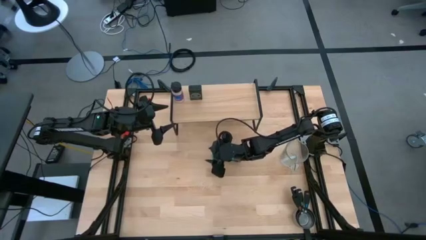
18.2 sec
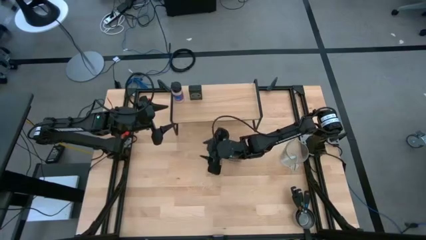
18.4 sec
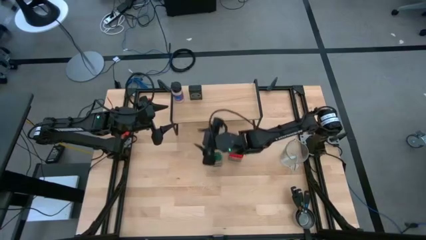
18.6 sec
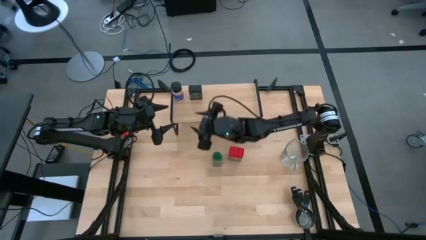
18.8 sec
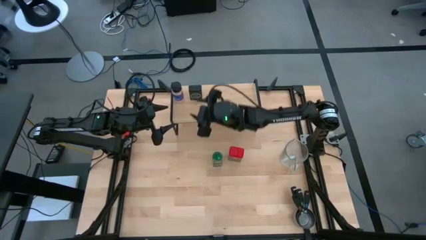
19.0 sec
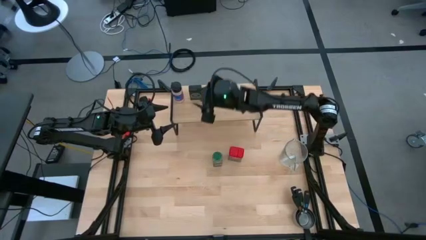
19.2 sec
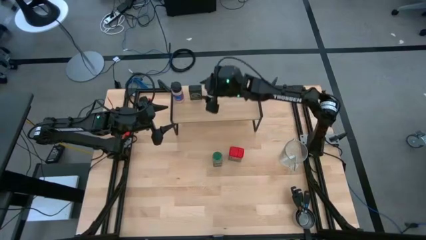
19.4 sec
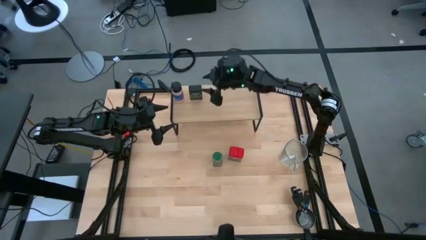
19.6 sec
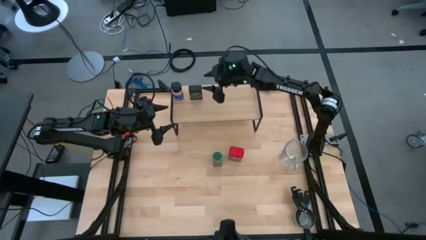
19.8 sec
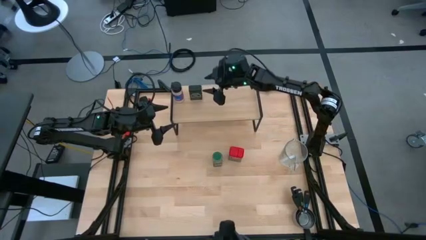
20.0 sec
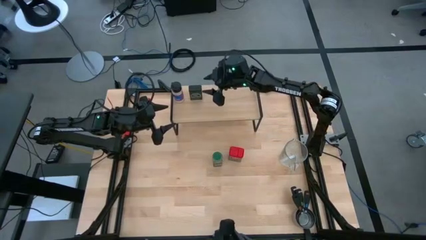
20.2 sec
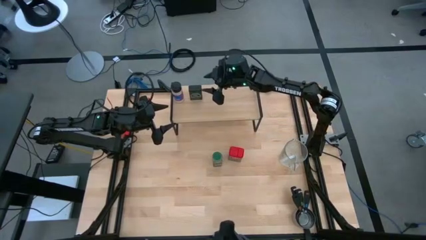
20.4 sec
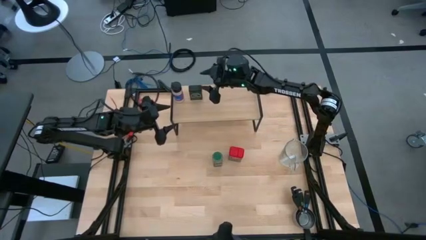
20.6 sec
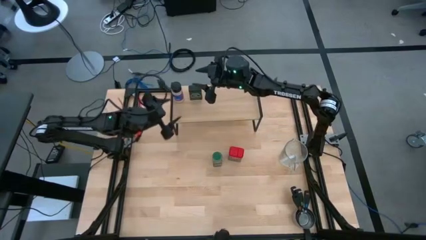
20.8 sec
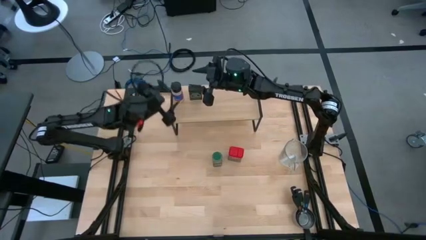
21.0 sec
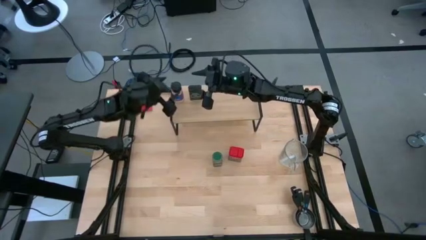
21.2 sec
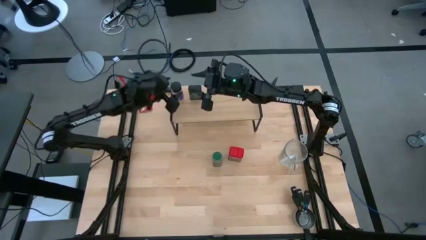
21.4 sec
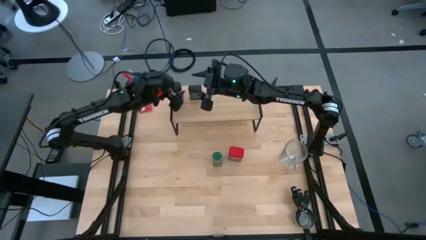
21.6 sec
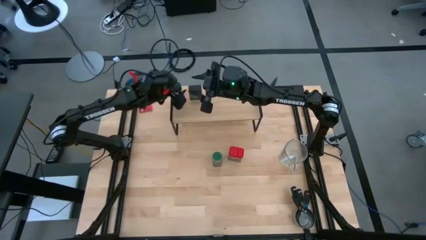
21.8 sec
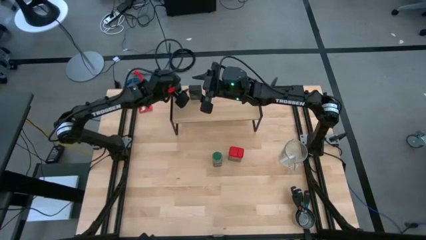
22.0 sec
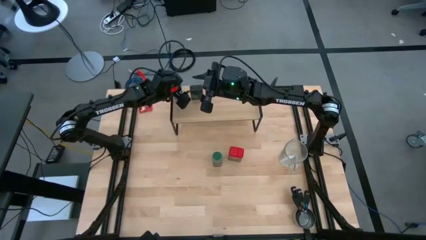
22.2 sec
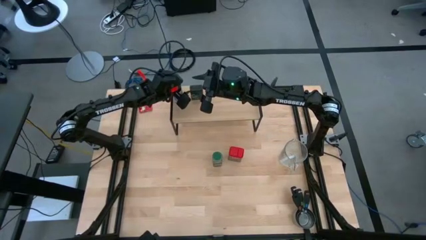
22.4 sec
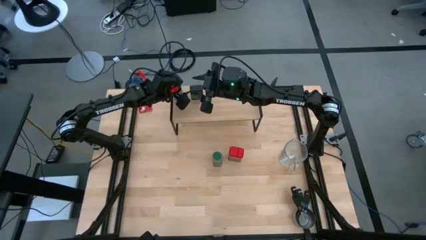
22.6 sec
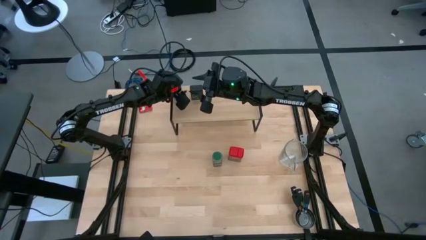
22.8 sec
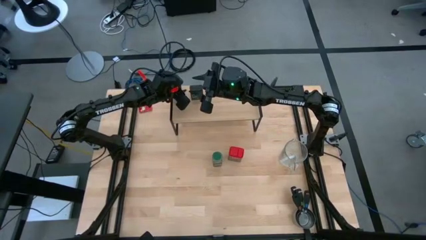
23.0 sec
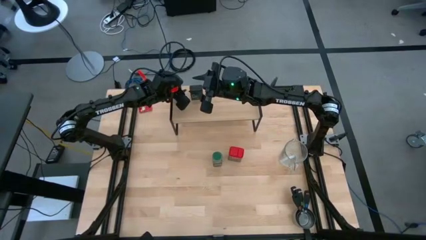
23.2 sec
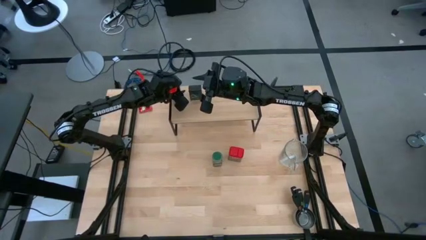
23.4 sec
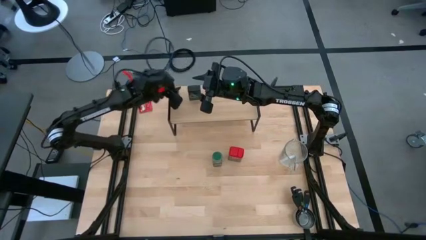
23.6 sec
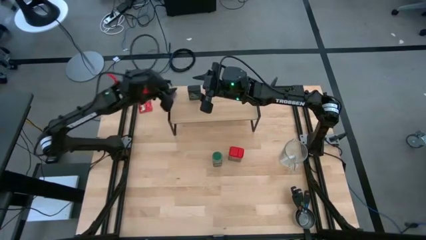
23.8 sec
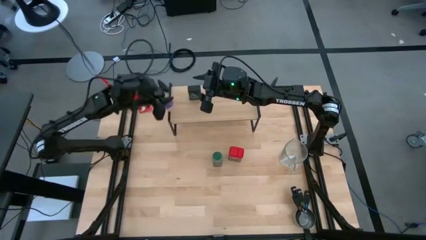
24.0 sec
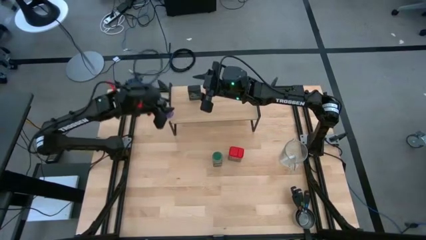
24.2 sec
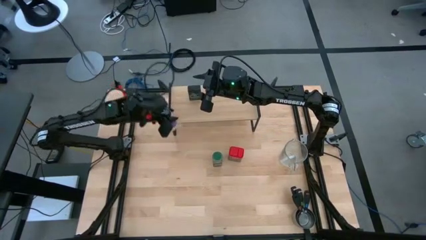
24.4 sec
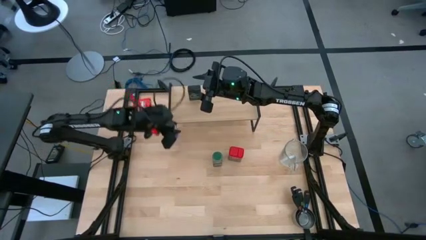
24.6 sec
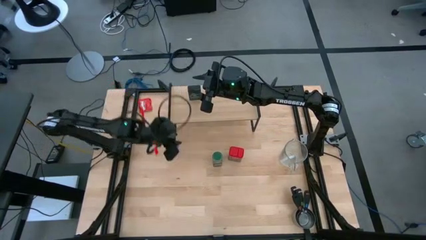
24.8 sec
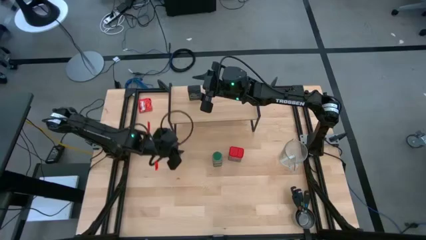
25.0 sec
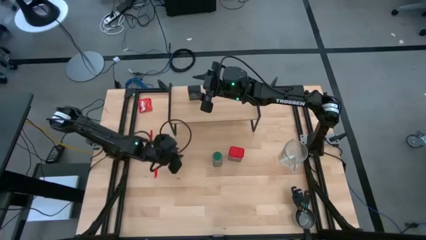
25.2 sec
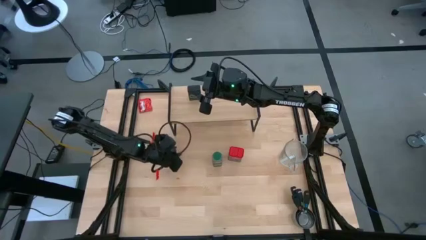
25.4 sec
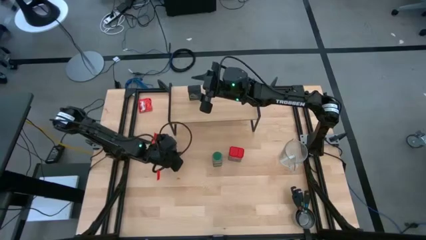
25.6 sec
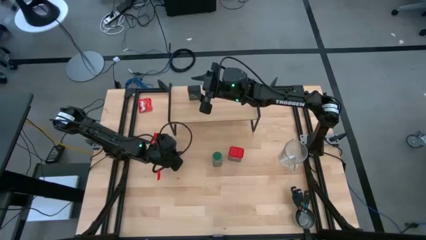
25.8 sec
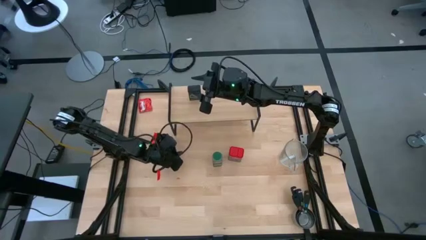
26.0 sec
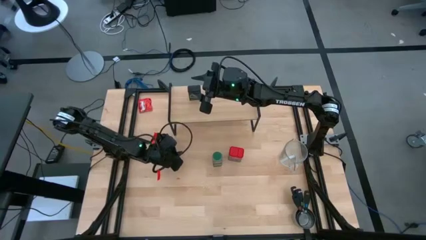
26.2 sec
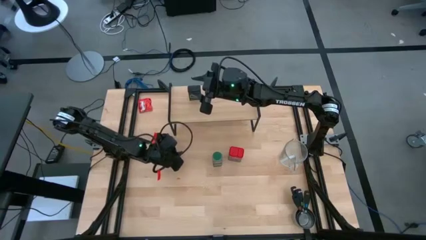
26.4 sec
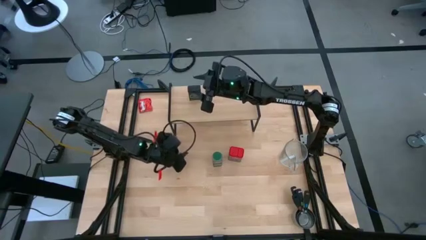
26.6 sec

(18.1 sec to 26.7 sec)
Task: Shelf spices
Remove the black seasoning bottle from the shelf

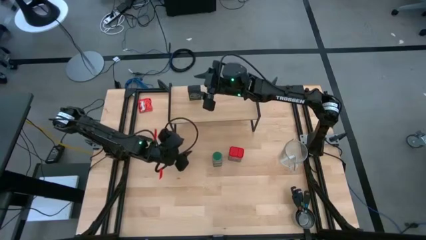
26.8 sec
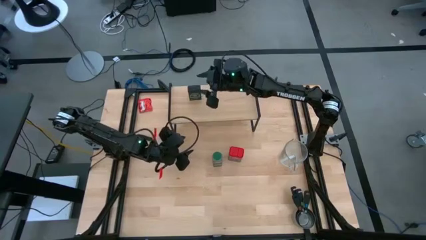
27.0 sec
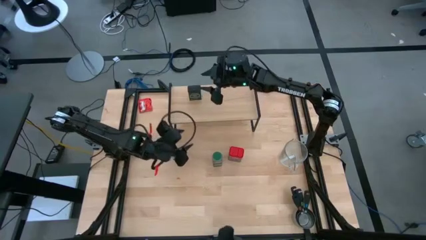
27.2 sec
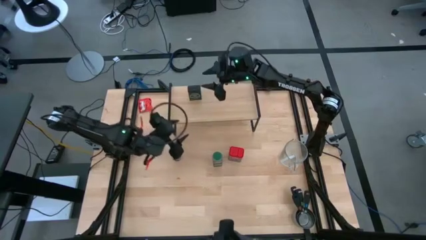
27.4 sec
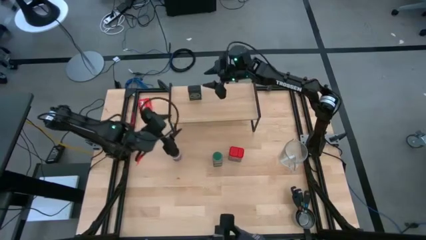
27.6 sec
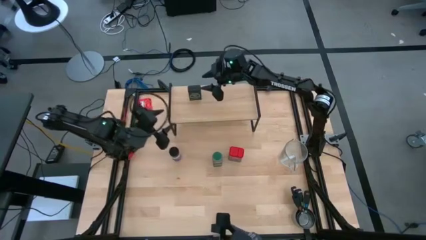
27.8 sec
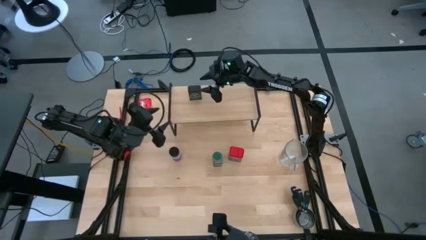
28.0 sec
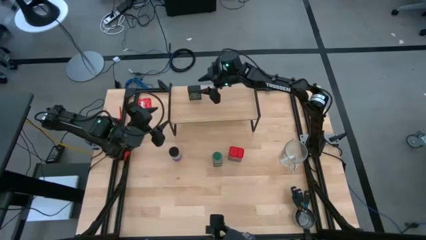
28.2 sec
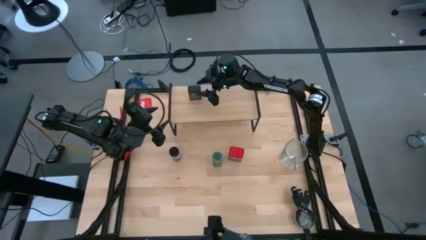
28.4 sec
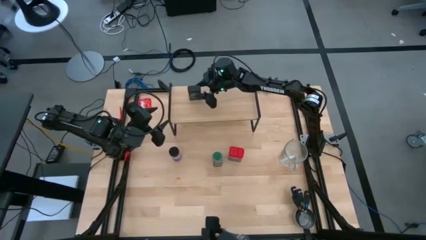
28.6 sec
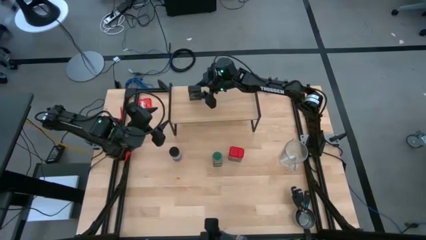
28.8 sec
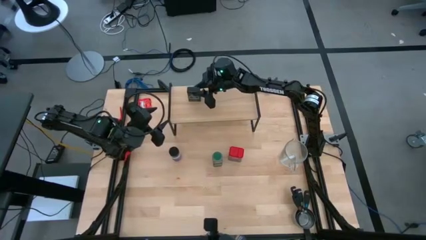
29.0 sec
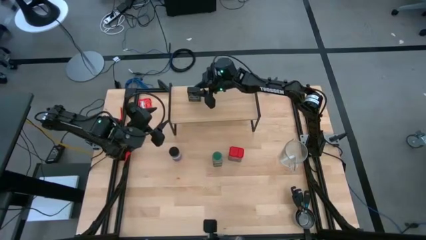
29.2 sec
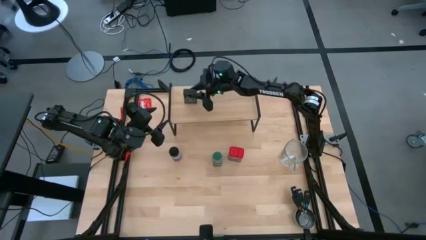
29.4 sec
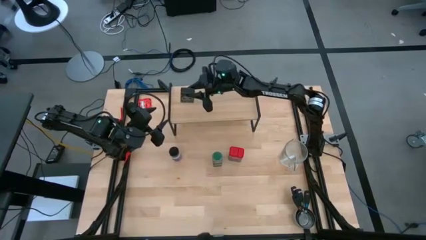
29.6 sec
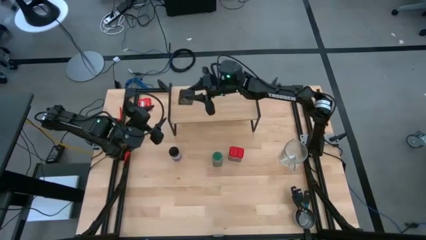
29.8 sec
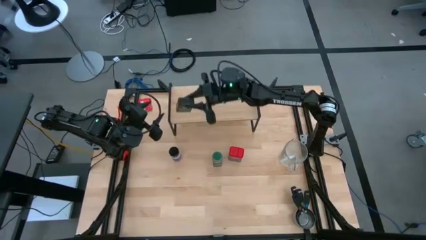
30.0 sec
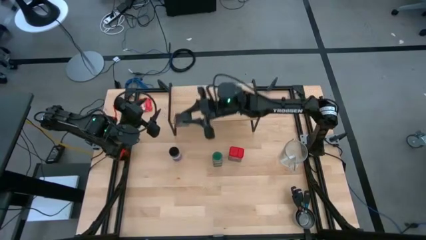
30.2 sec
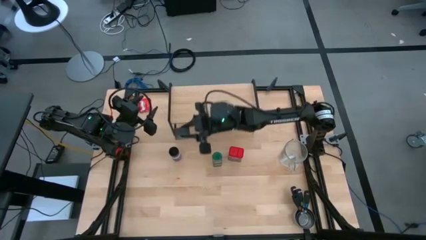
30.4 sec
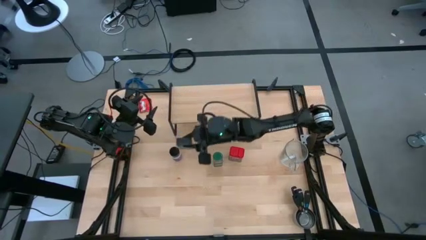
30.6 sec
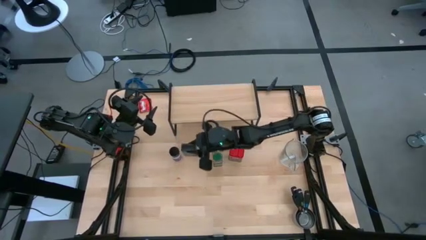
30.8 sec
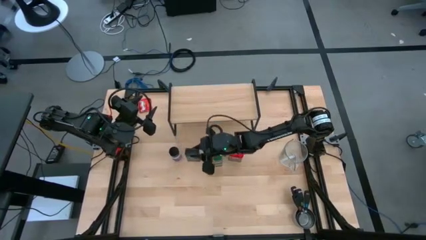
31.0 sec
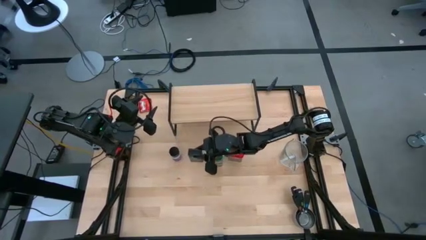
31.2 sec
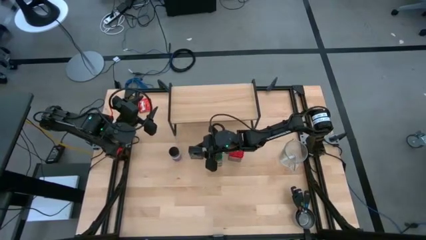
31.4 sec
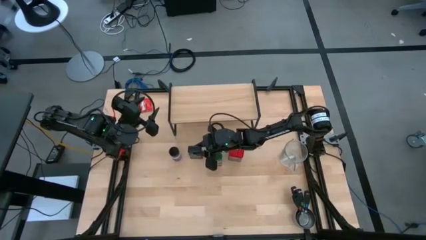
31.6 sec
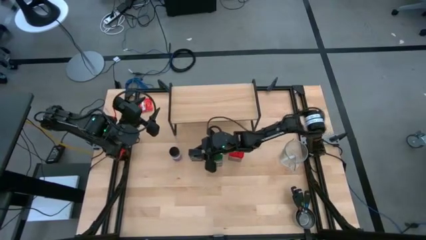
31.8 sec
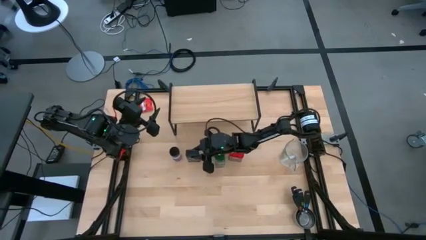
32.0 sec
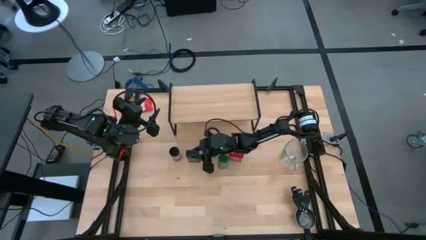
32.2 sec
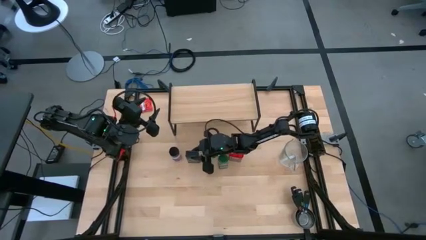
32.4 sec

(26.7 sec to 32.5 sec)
Remove the black seasoning can from the shelf
